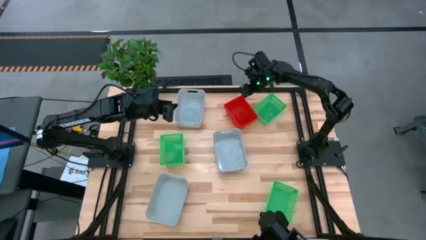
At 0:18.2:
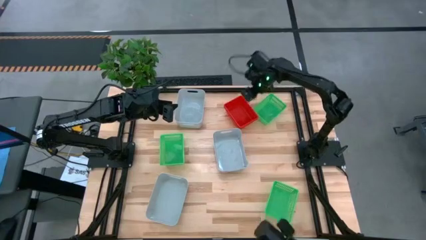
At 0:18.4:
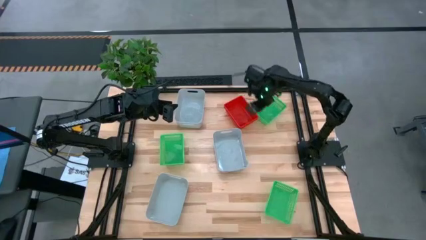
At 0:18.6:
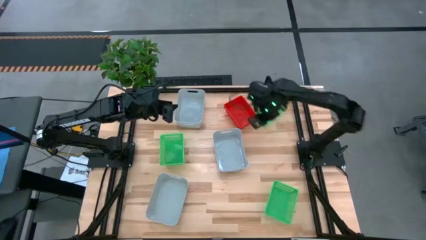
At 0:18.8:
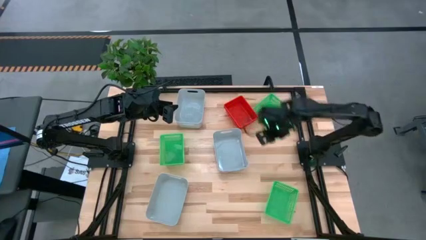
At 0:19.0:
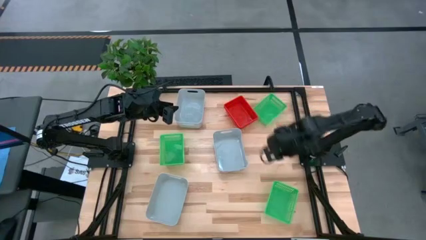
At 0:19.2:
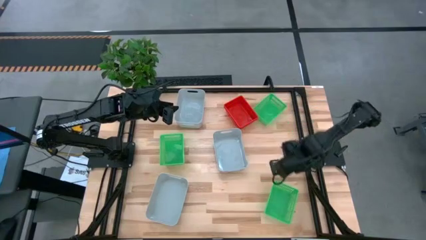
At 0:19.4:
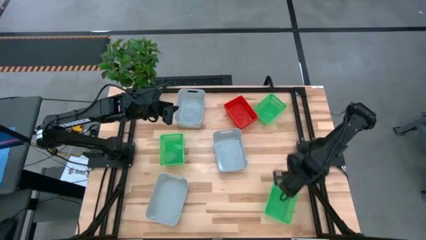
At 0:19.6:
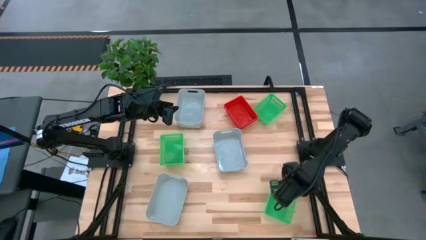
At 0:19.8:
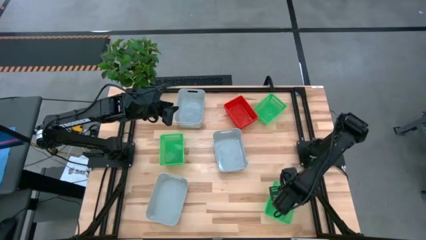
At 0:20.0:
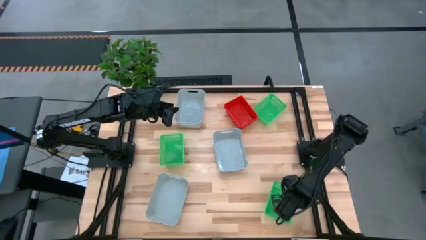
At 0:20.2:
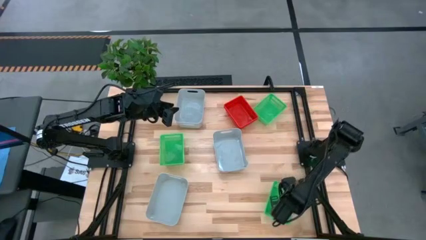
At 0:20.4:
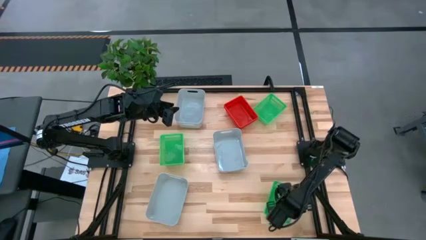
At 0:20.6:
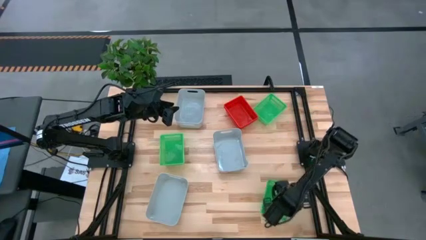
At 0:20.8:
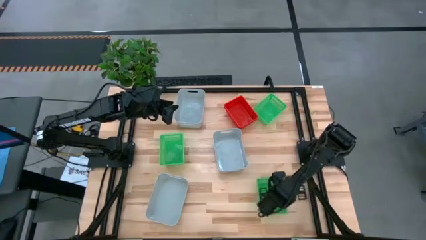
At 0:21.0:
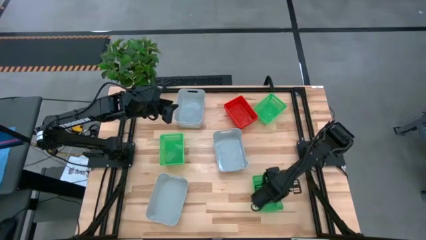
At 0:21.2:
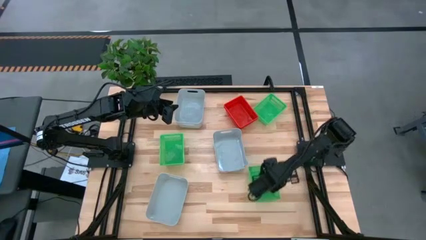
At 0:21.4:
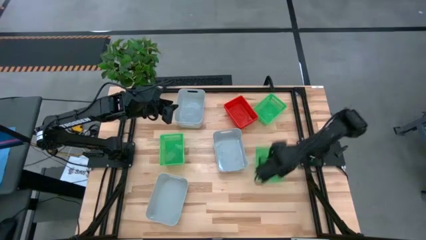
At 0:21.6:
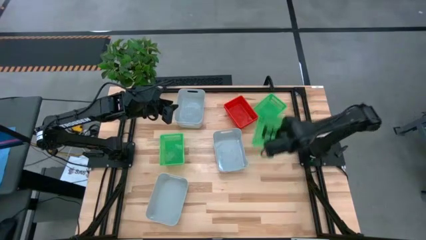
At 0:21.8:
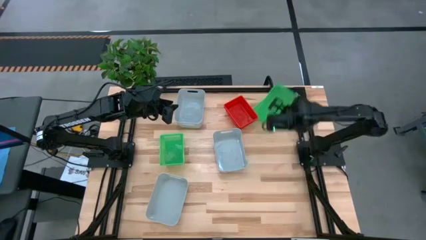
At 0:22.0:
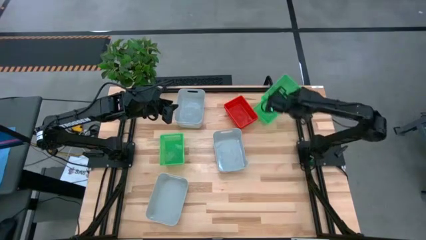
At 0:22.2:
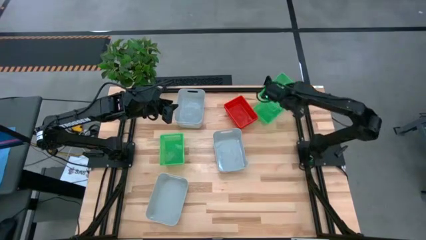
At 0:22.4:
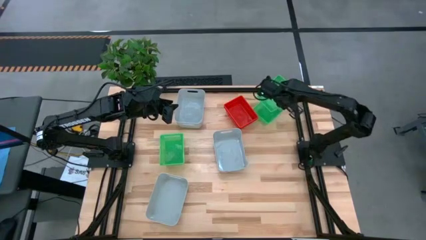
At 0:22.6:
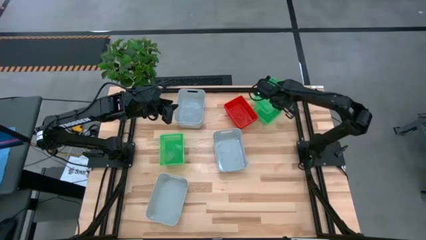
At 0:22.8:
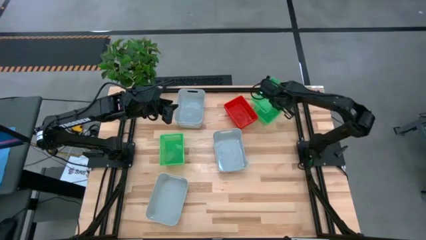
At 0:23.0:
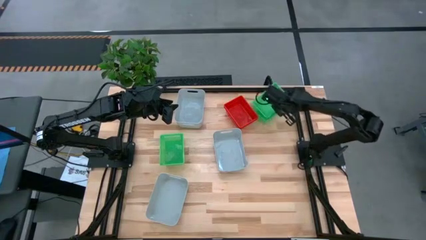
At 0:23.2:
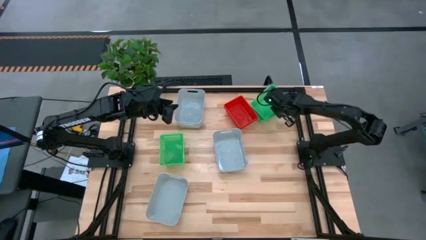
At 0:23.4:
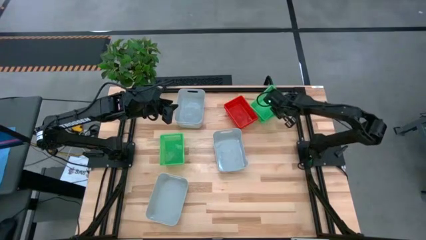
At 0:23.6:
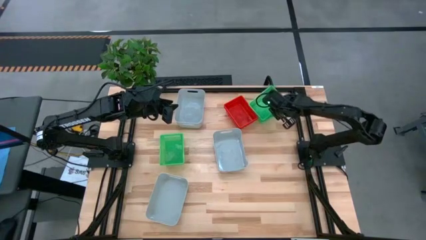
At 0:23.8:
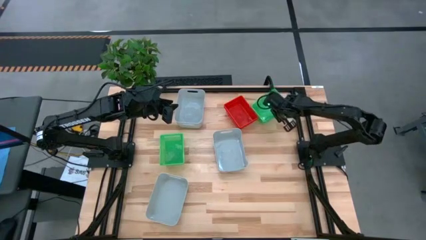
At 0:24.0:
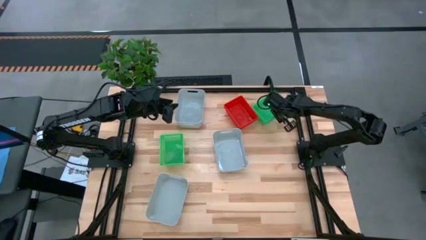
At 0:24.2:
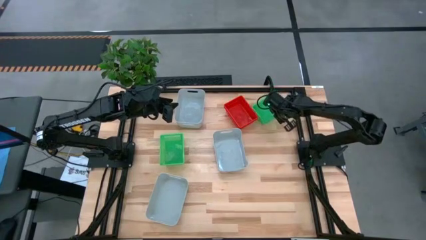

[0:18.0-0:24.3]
Stack the bottom green bin on the top green bin

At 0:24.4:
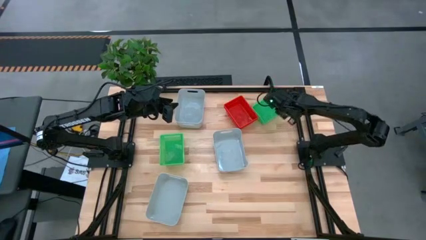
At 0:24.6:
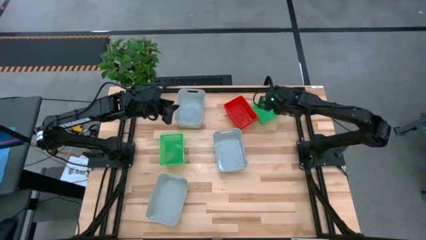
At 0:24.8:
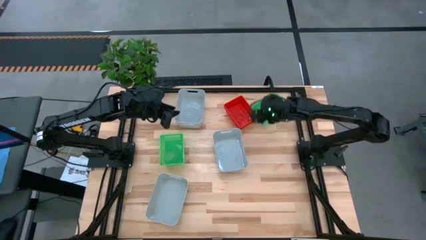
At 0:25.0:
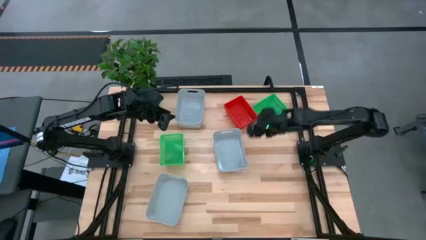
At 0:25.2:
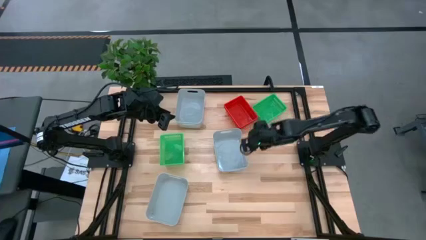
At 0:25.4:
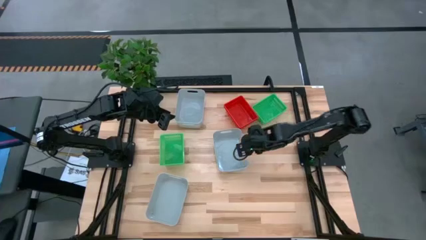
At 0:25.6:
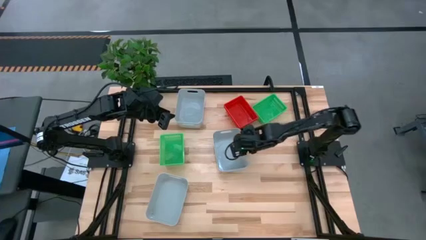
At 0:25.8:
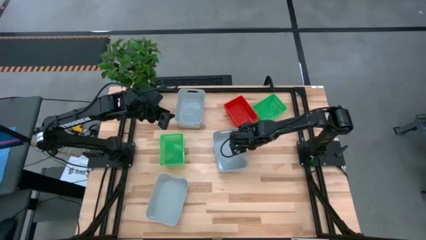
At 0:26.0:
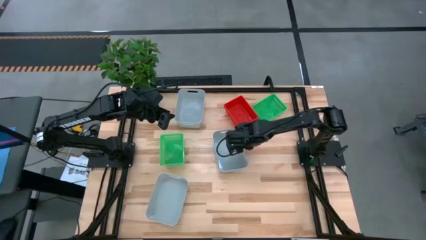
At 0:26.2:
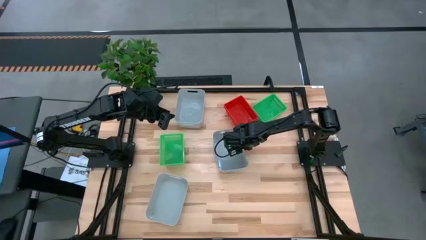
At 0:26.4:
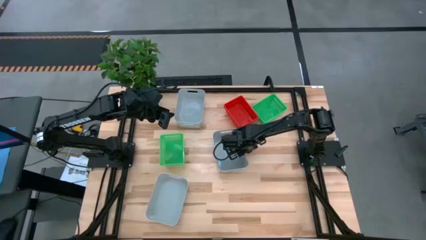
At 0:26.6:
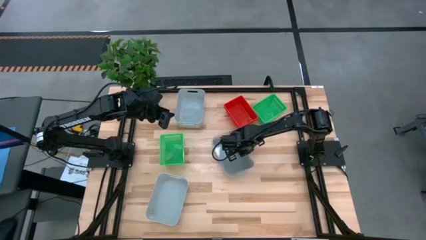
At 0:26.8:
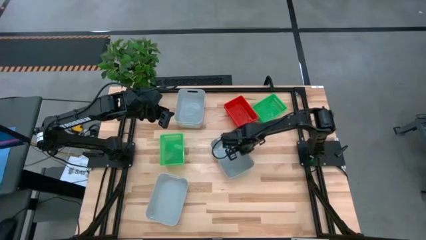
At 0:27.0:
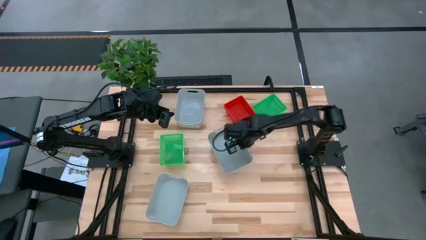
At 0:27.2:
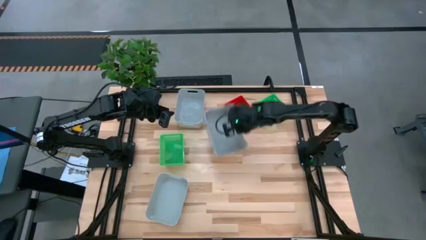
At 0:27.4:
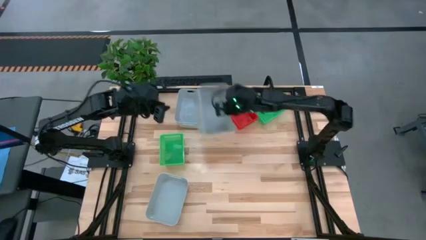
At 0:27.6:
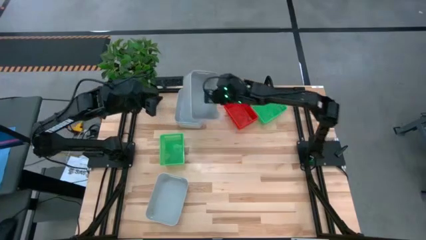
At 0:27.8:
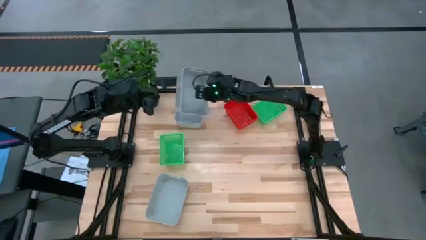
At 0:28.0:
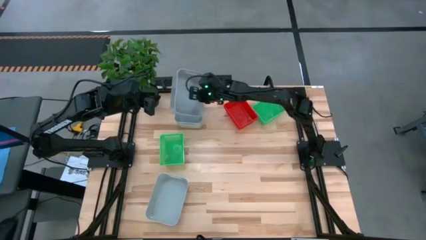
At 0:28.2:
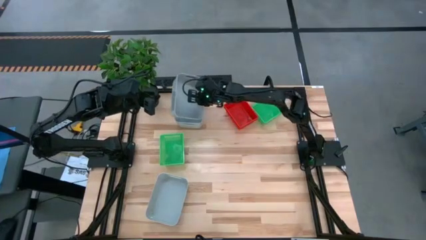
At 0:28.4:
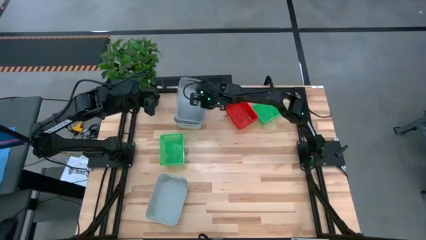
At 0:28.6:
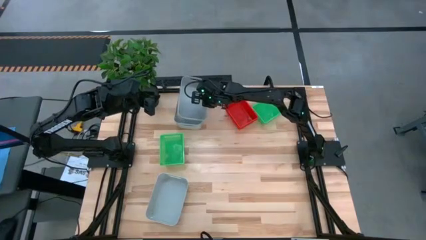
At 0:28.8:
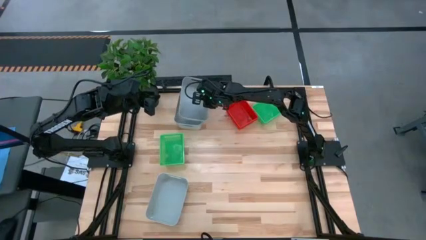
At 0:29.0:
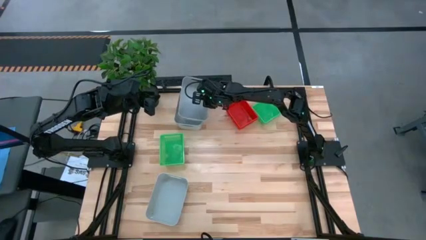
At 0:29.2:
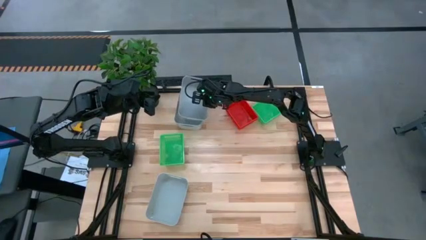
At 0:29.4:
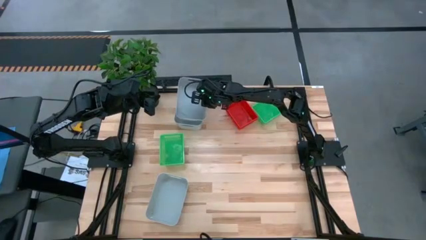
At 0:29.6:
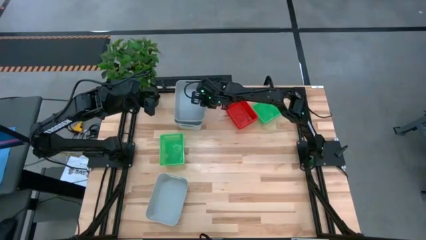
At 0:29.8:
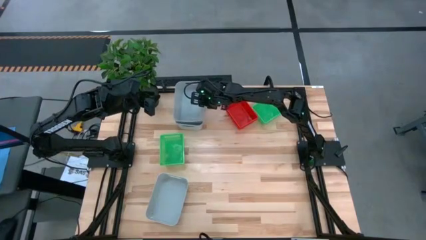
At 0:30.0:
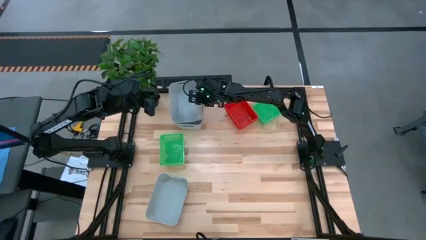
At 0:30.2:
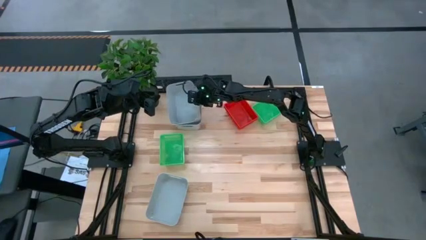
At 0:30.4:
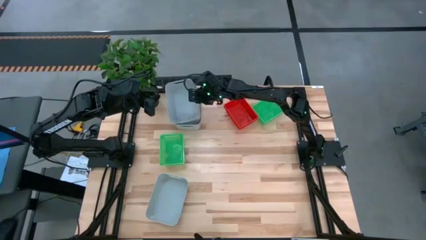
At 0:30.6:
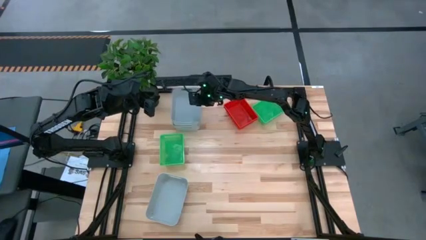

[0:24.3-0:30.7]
Stack the middle gray bin on the top gray bin
